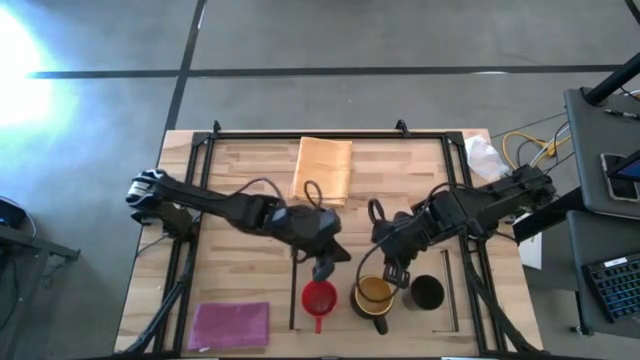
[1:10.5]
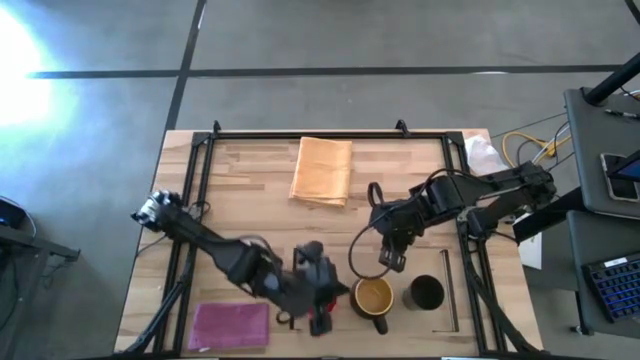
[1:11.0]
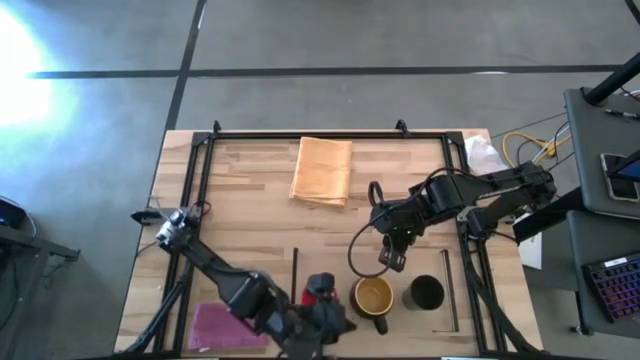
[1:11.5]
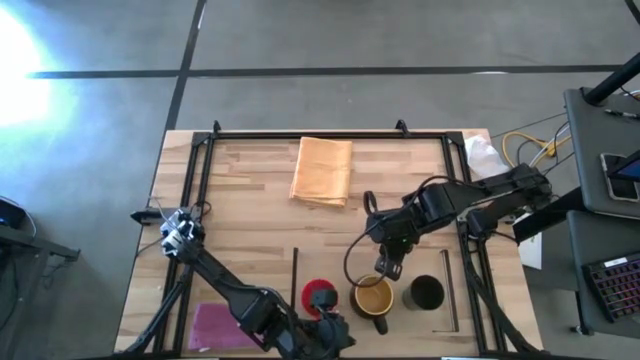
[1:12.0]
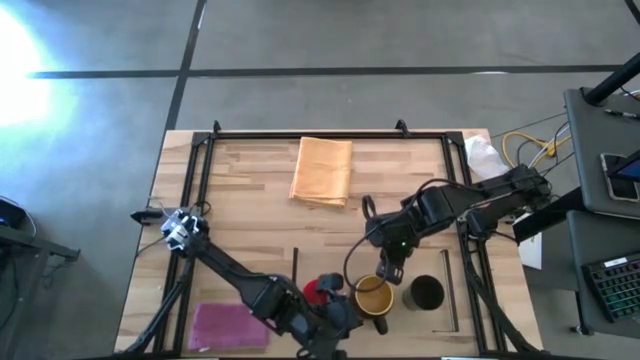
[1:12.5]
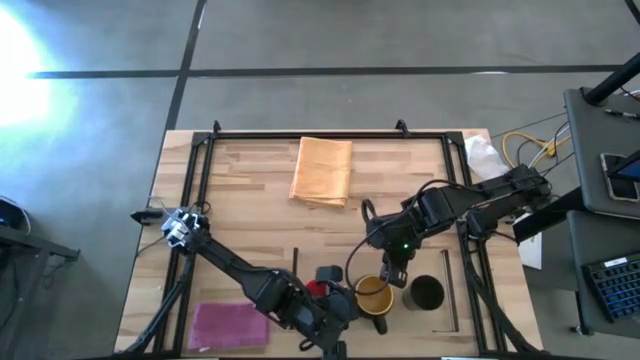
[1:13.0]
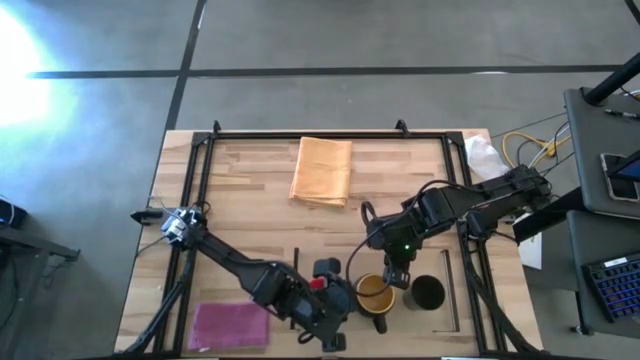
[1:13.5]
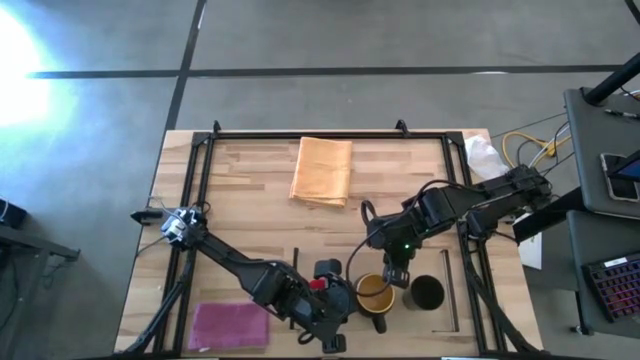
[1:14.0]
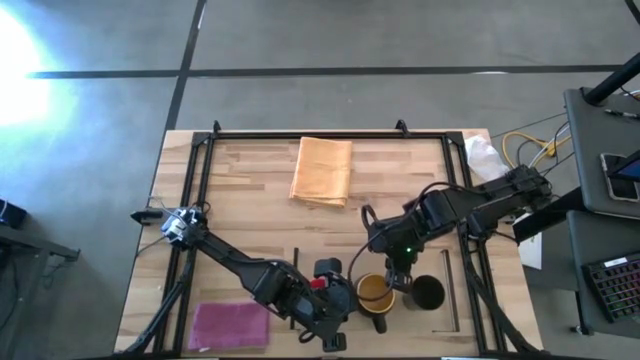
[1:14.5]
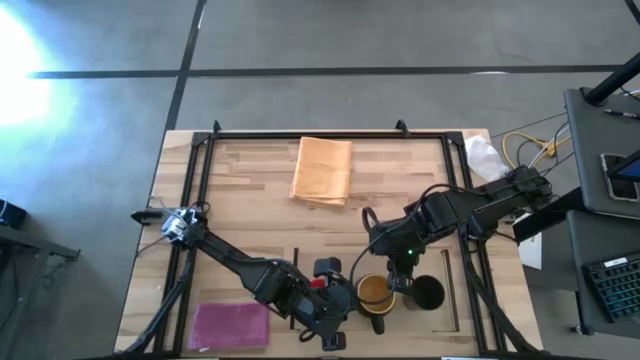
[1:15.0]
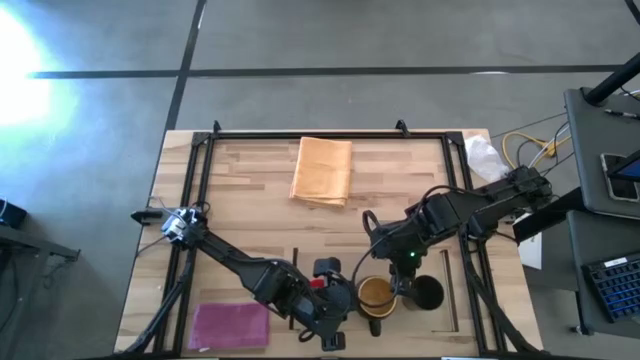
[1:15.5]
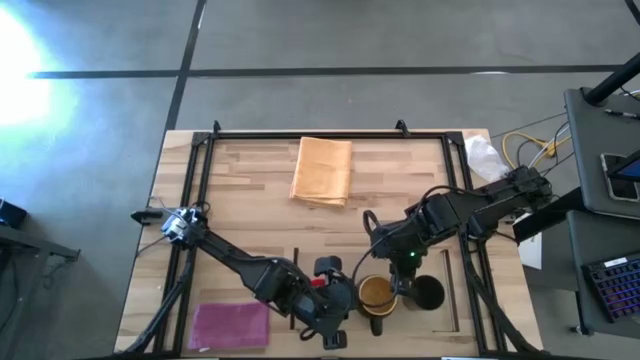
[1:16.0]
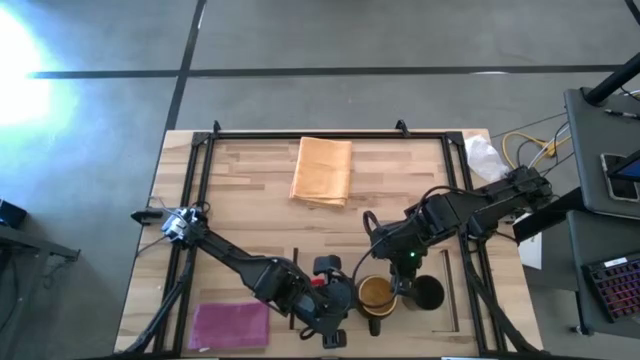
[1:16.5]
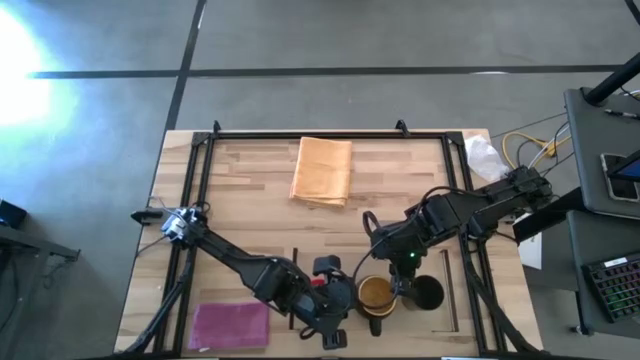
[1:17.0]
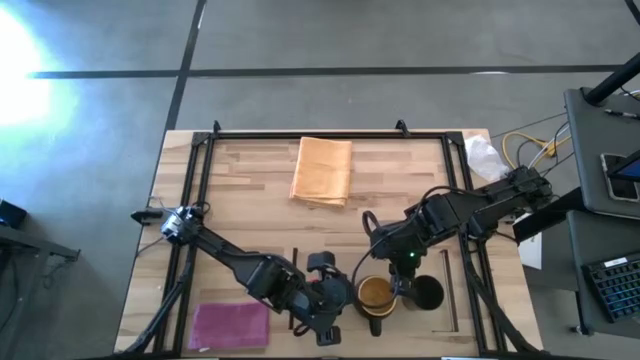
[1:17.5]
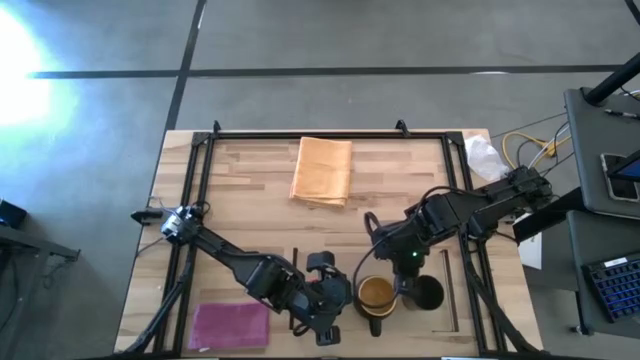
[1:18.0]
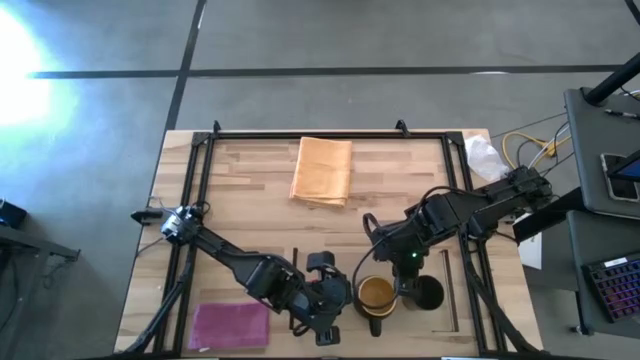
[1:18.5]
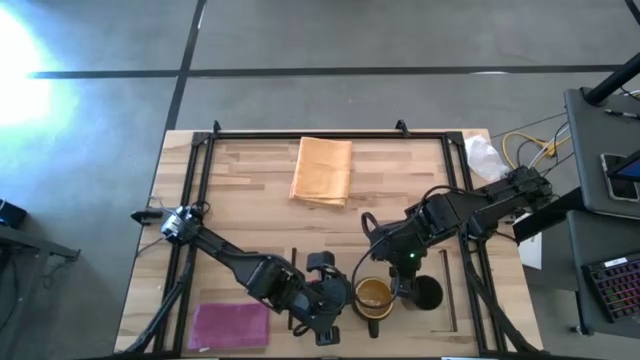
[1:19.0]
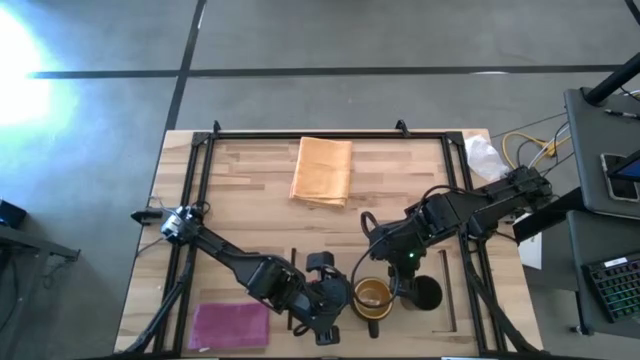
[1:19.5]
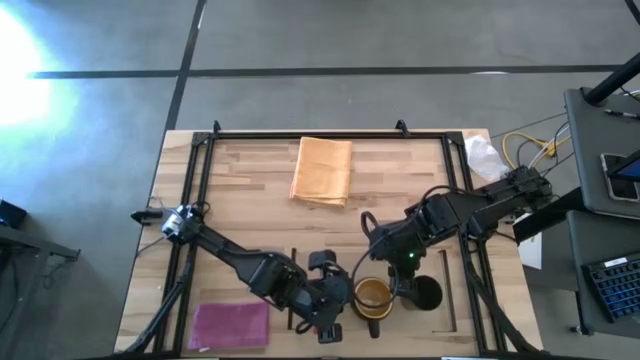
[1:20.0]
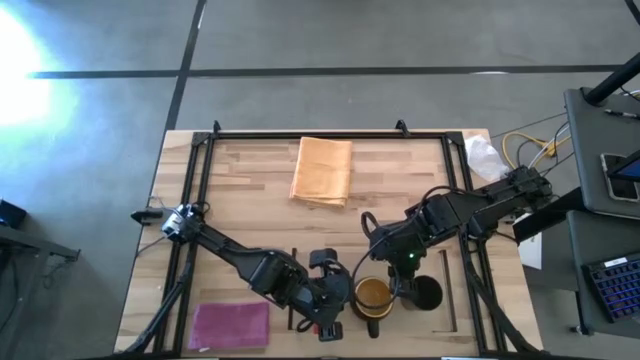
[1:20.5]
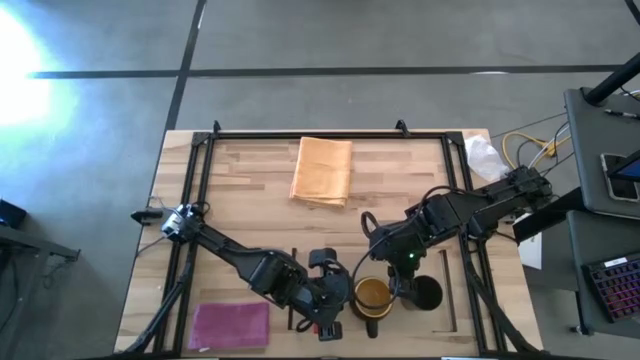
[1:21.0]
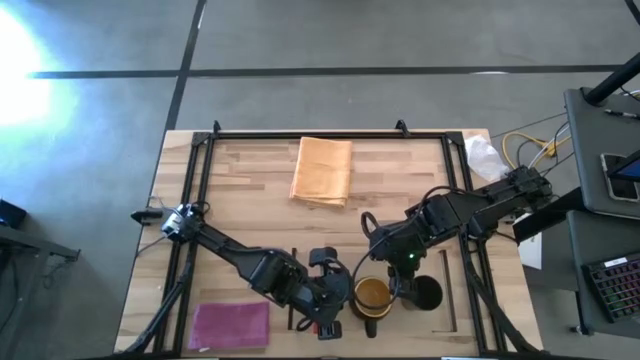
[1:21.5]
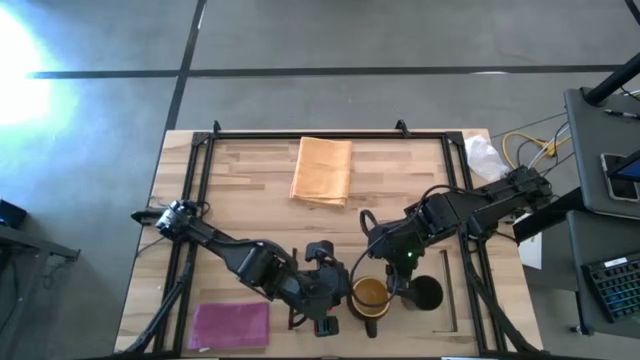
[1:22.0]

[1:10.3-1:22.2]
Task: Stack small to large cups/mugs on shelf
Adjust the black mug on the shelf

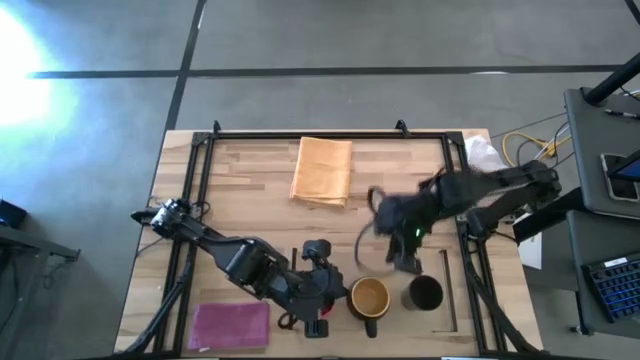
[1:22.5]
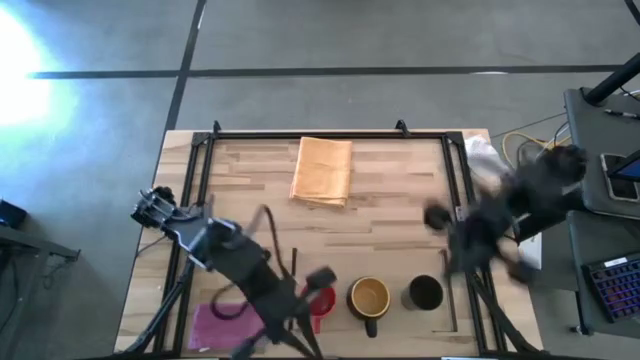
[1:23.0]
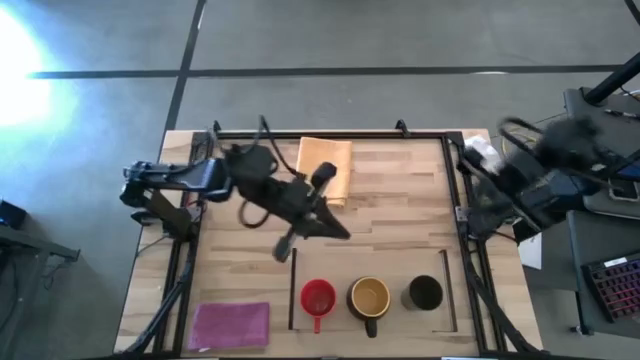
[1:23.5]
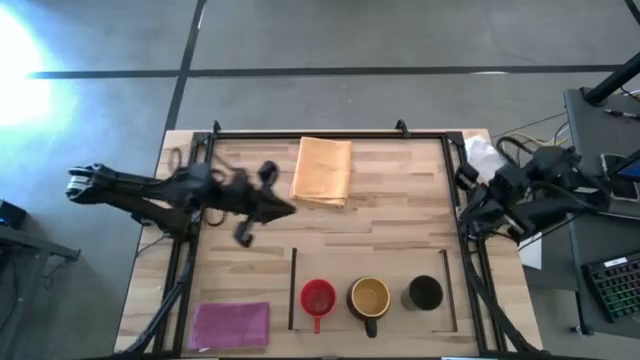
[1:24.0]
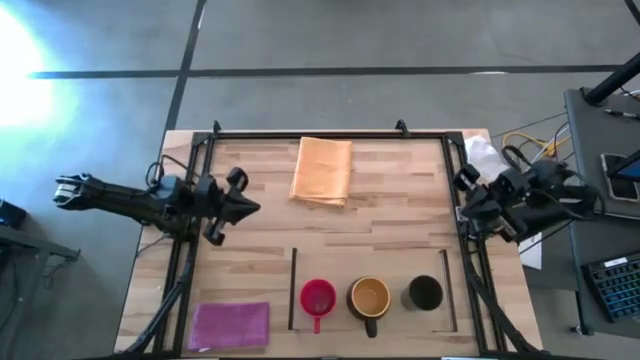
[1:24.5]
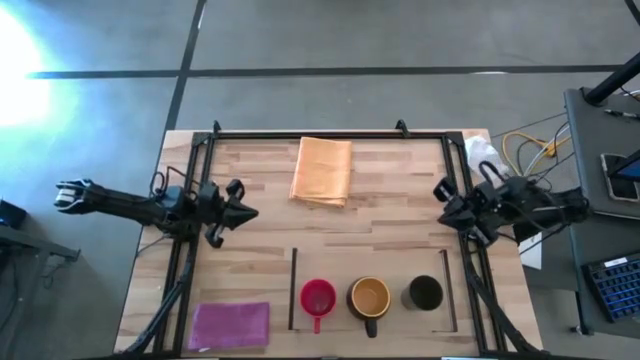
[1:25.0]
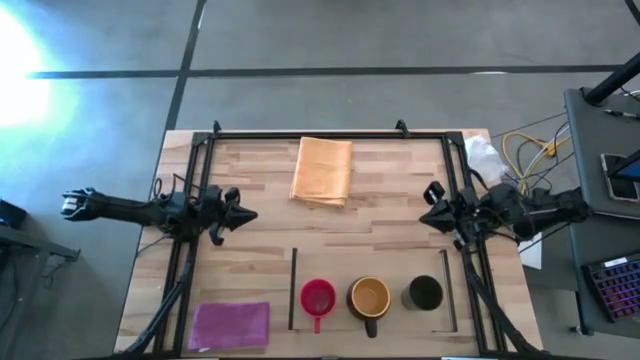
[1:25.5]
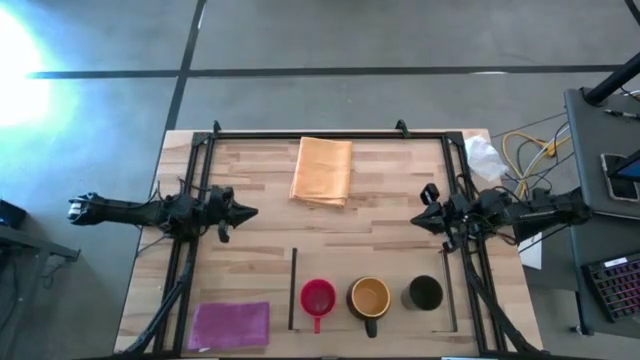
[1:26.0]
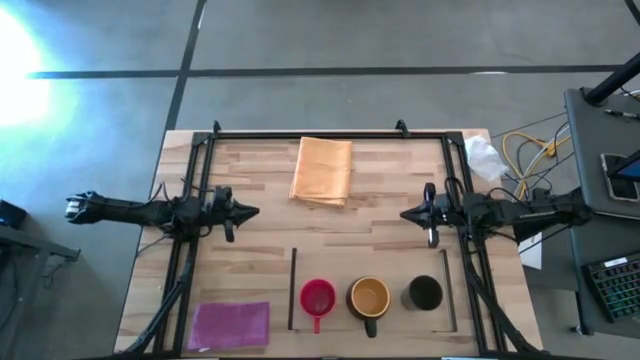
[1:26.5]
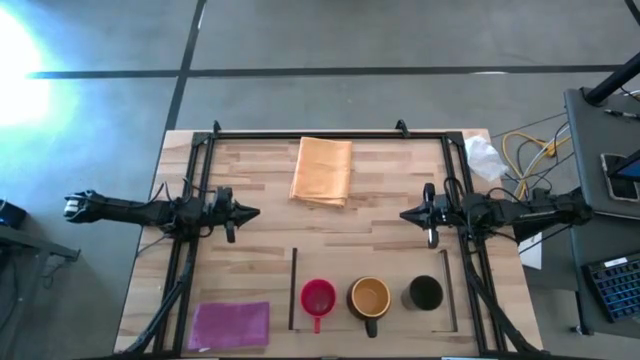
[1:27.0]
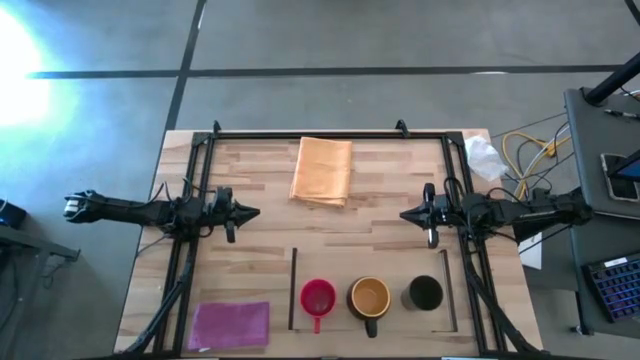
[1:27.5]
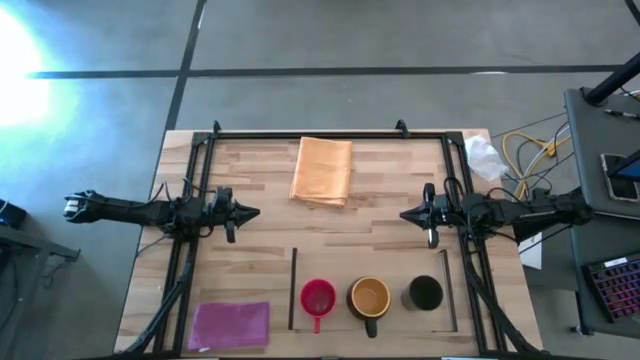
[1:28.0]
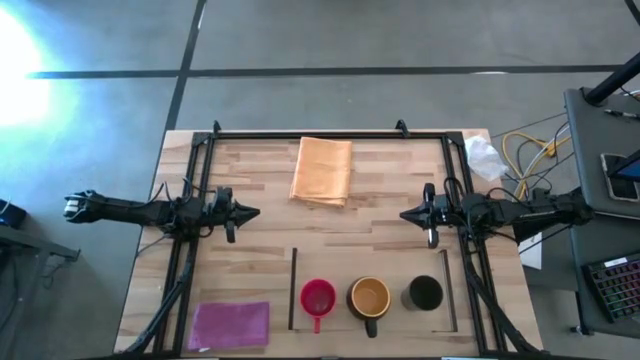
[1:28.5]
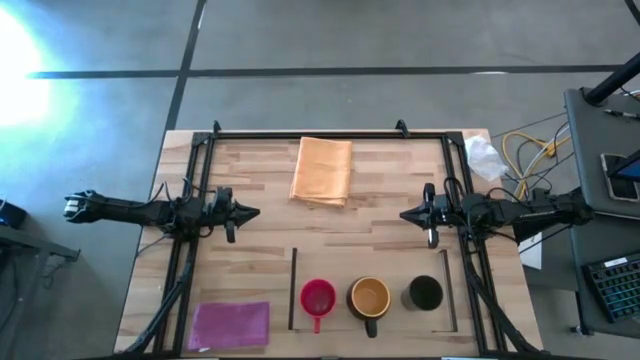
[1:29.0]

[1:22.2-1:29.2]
Return to Home Position

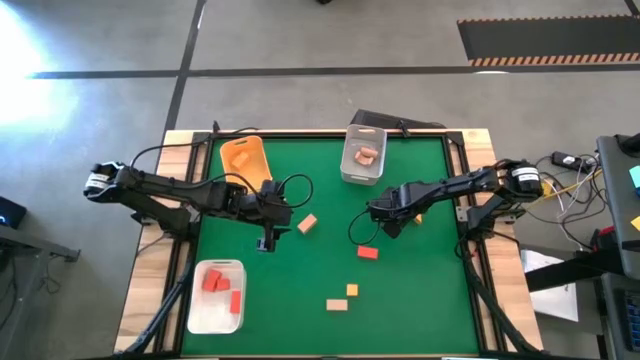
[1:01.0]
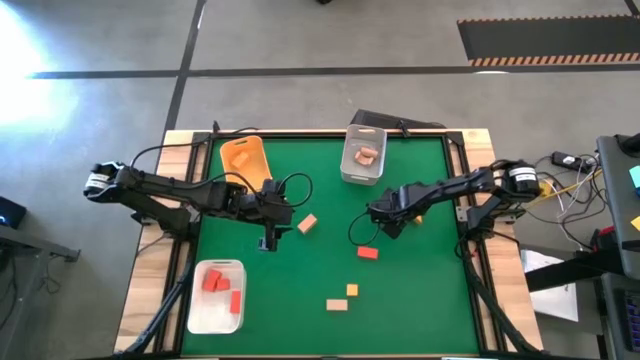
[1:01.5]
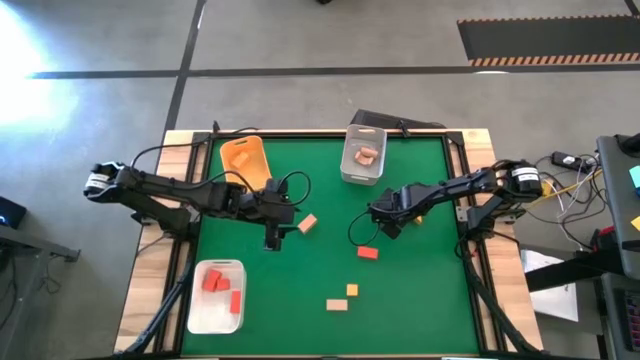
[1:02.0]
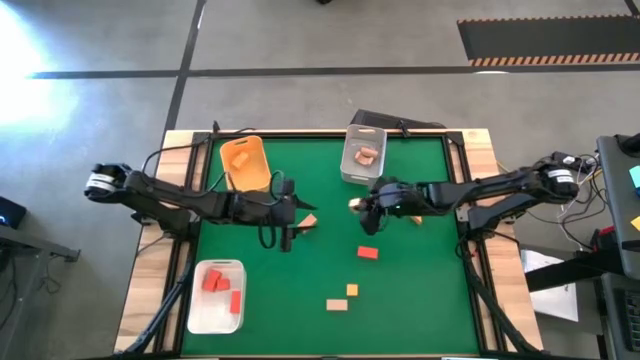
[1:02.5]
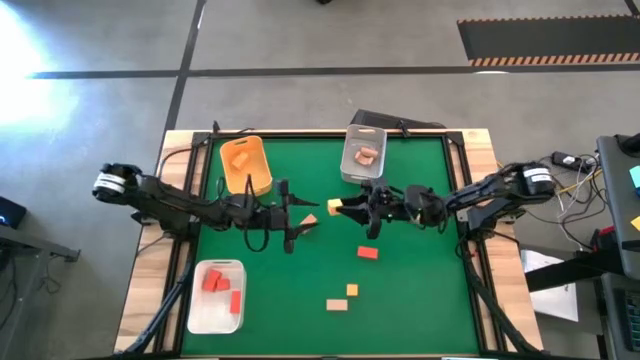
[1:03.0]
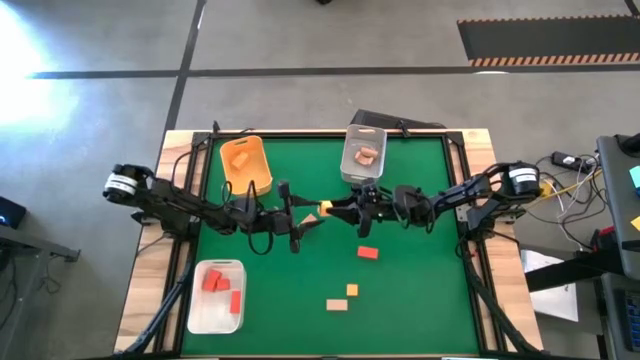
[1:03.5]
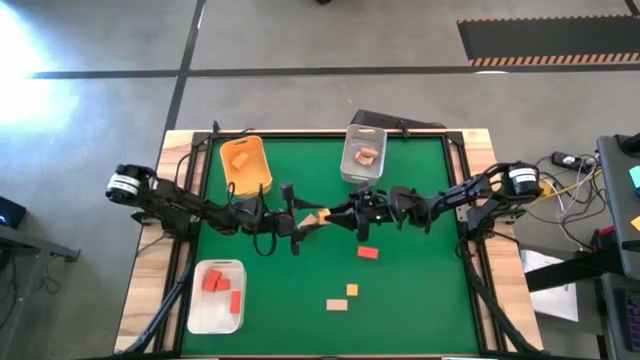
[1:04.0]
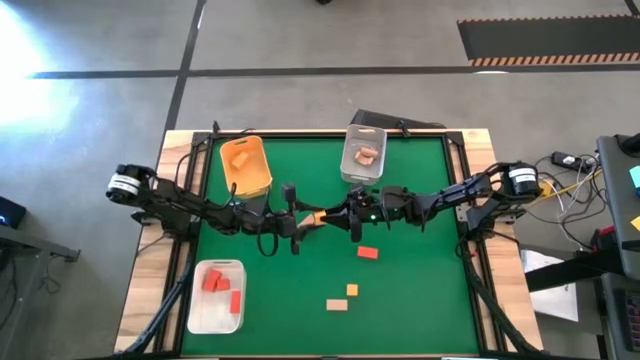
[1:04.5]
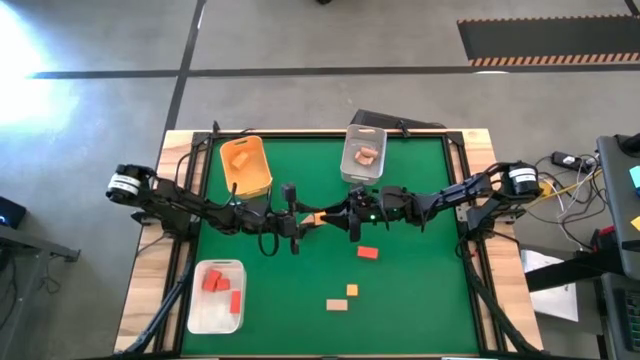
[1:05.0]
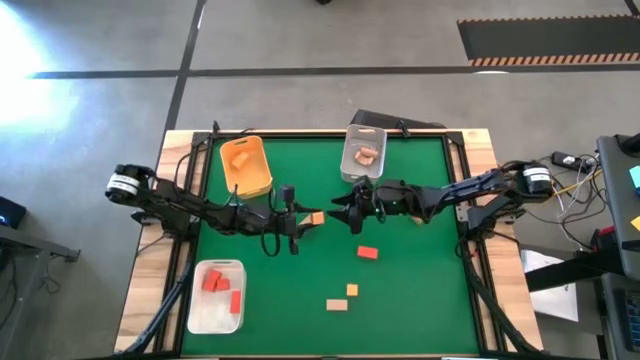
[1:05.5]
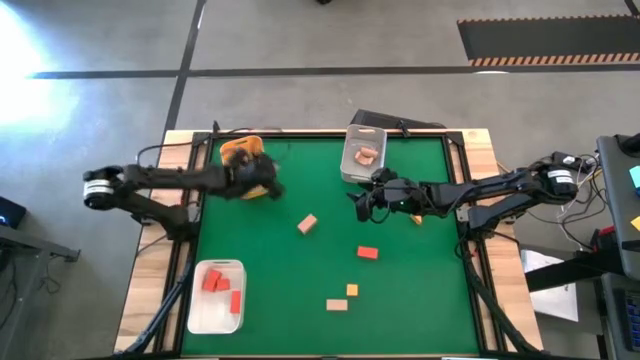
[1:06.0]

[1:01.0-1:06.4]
Task: Sort & place blocks by color
Put the yellow block into the yellow bin
